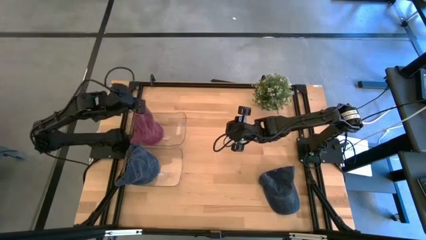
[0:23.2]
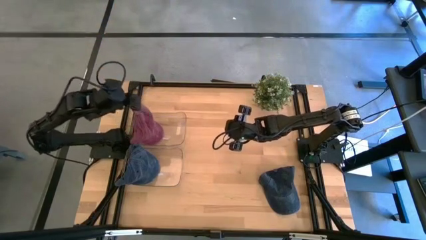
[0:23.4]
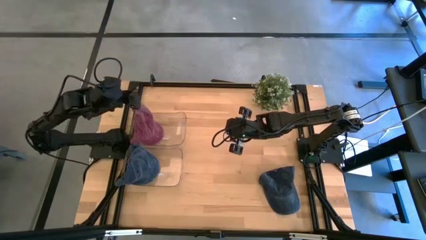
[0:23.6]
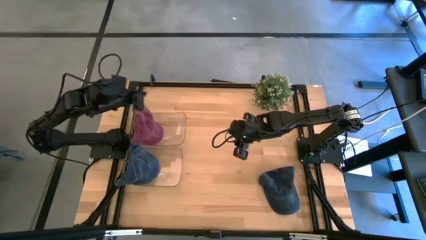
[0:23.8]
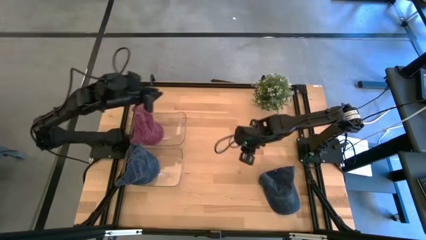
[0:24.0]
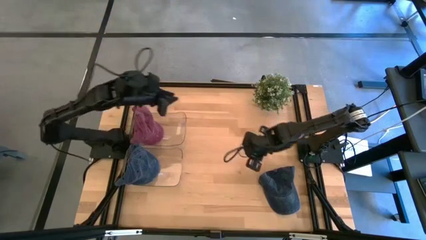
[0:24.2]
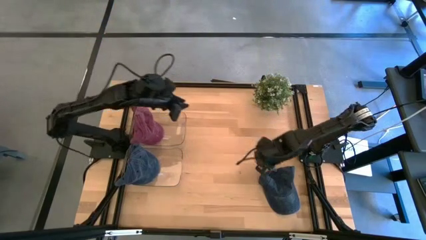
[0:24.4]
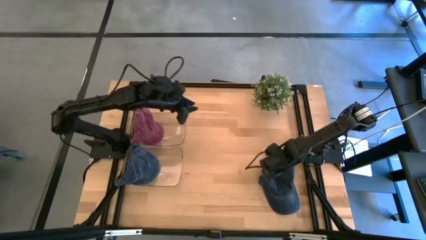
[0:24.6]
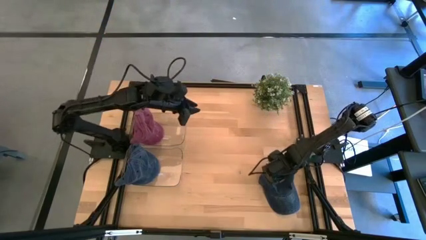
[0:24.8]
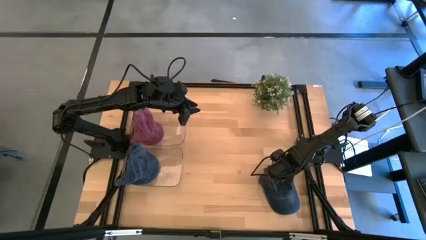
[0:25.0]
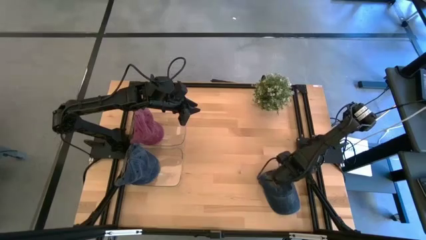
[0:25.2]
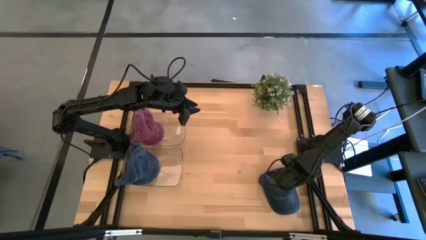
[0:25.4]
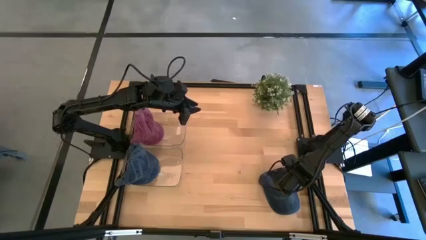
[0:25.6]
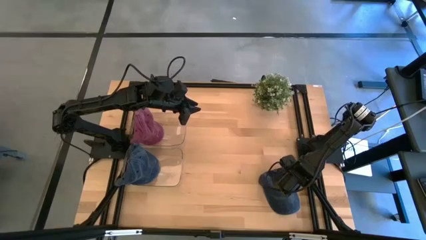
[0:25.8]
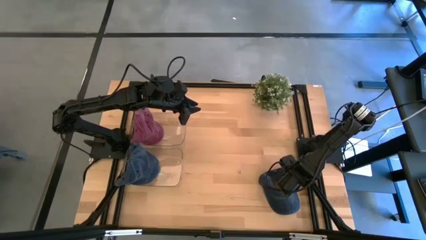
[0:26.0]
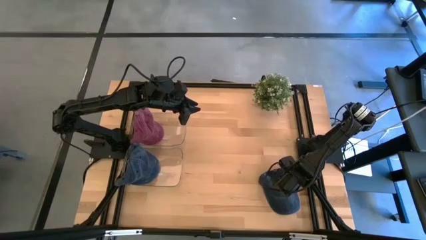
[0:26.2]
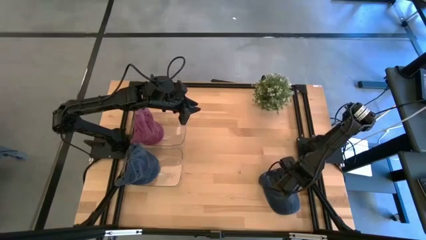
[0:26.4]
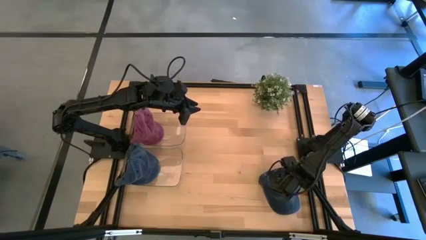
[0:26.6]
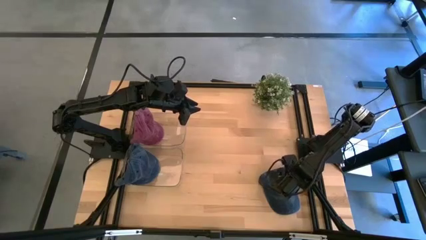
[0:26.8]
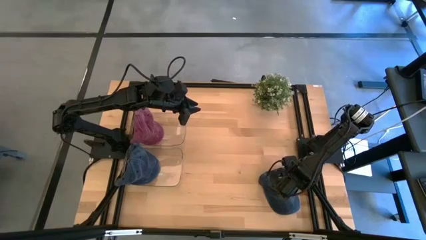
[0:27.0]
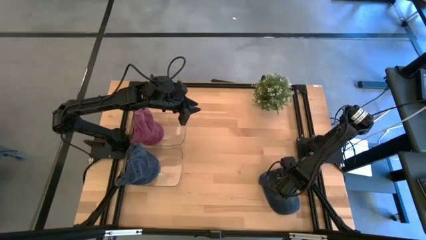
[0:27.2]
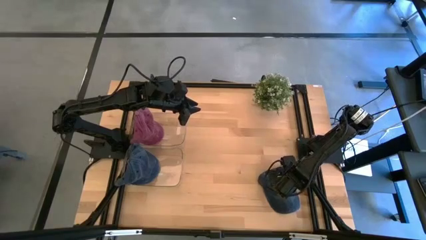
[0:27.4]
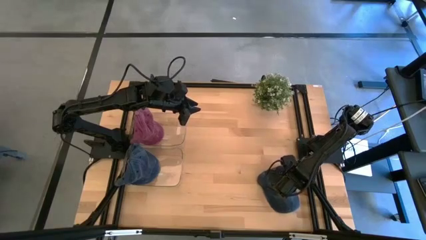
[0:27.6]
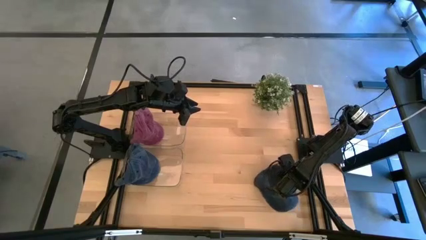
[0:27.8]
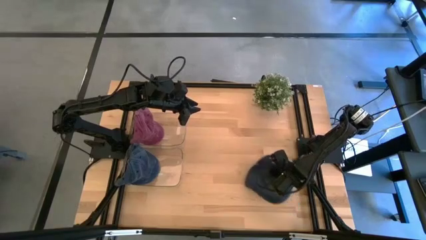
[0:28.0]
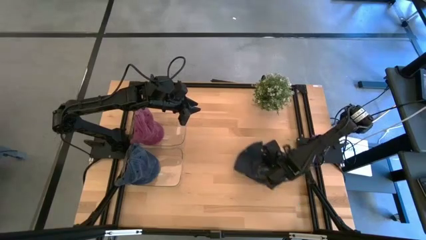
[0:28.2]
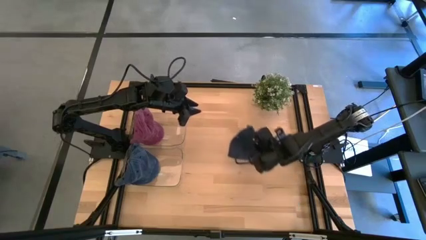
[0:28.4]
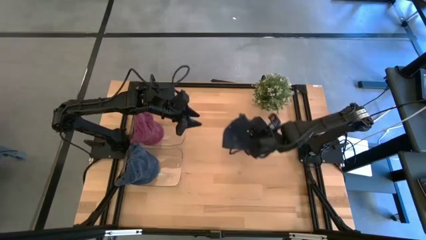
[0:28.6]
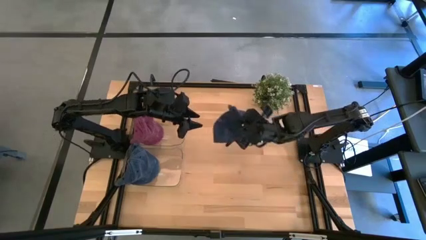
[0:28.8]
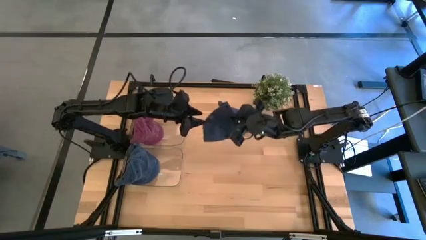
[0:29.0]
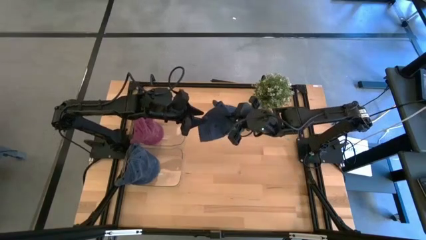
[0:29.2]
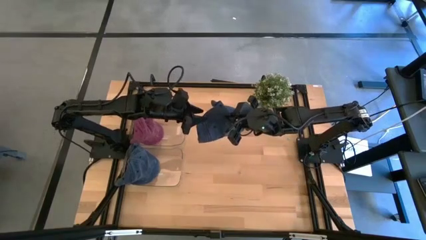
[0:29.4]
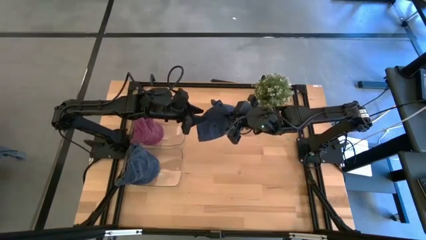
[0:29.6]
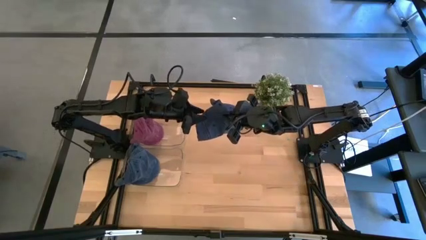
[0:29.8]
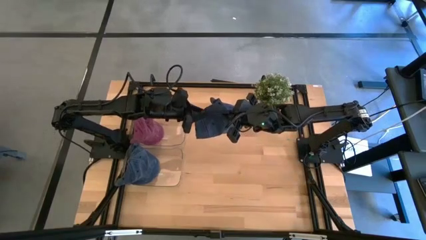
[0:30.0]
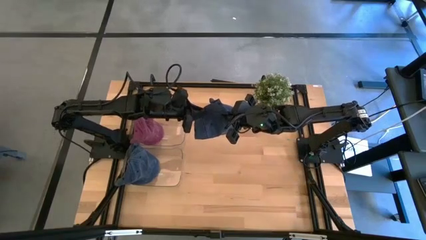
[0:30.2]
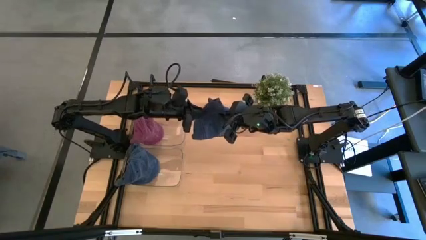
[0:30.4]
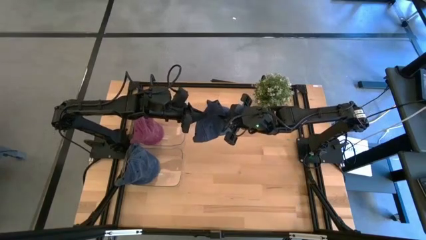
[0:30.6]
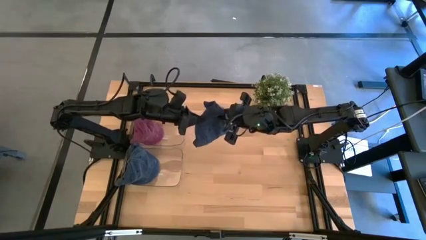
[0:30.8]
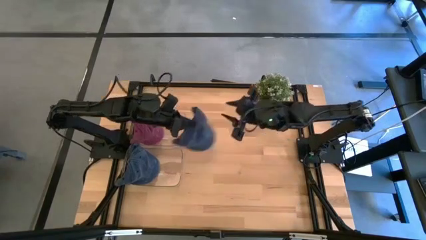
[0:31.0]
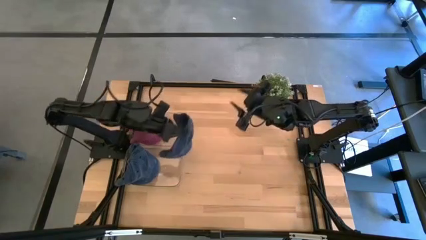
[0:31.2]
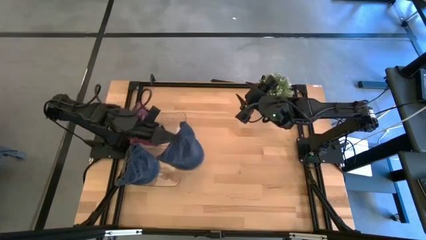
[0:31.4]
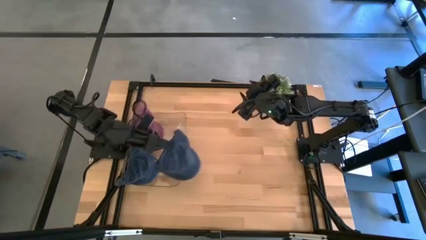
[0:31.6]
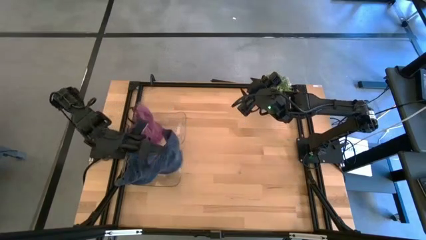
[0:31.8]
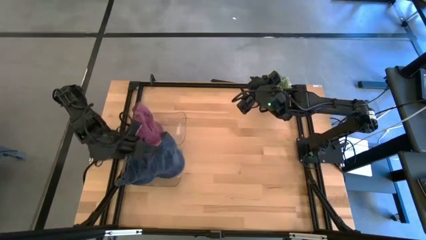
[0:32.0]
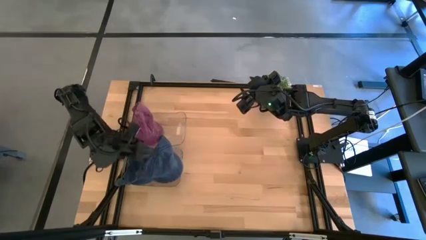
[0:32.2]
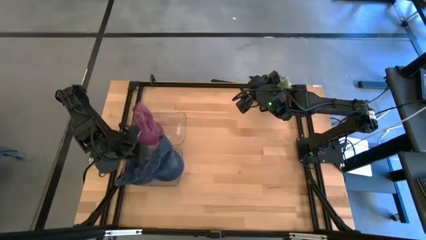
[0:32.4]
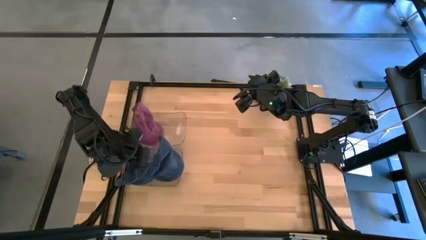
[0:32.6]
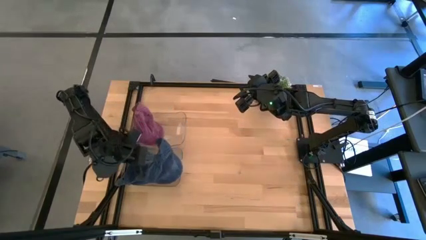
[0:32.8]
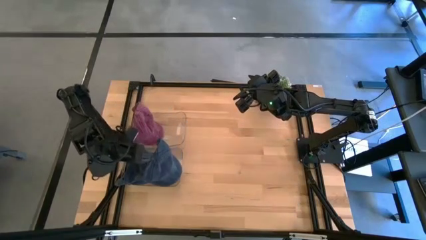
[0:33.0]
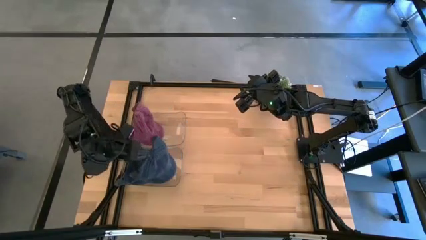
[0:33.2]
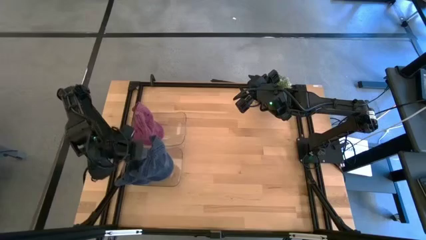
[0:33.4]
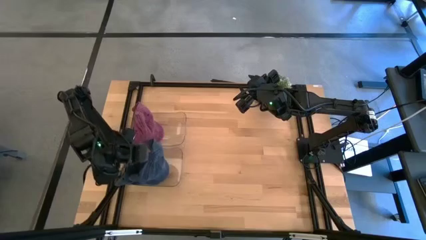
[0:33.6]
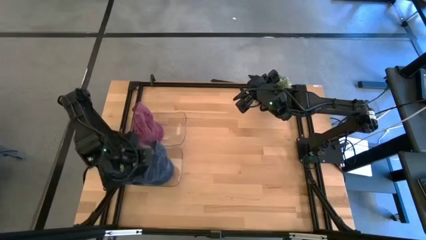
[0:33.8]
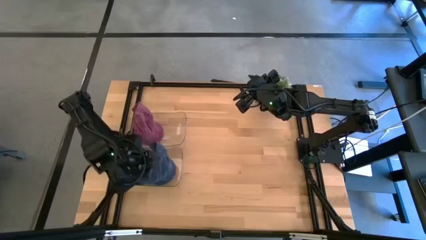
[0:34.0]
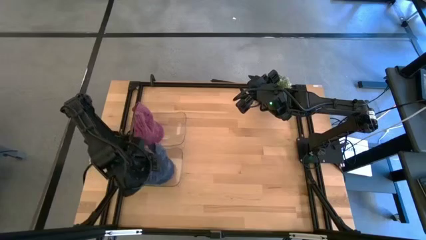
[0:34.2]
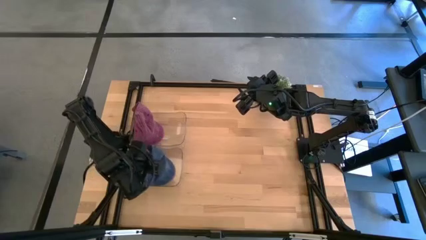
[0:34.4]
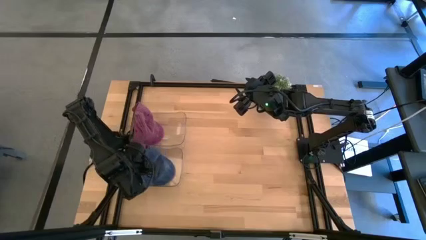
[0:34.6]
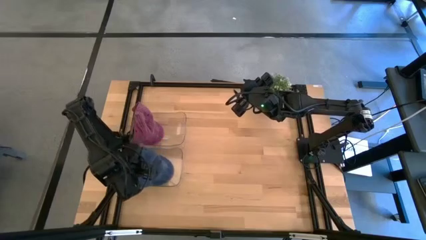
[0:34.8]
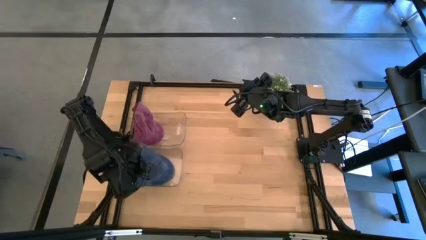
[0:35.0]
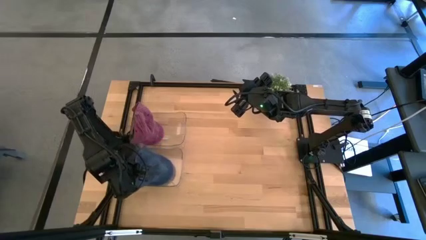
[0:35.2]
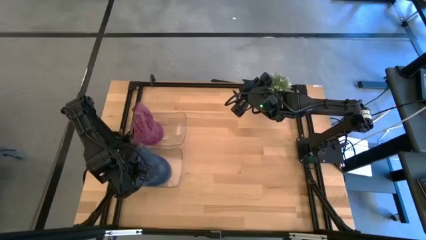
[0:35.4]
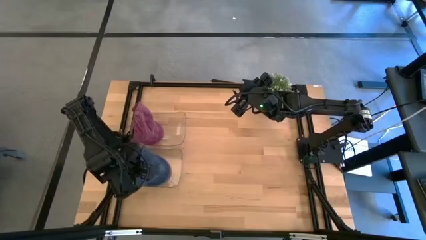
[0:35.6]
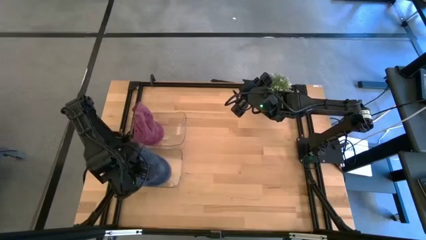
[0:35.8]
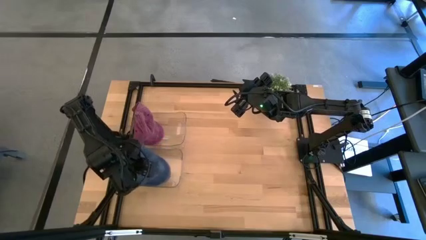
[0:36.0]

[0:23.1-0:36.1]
Task: Pick & Place hat
Put the blue cap into the bottom transparent bin

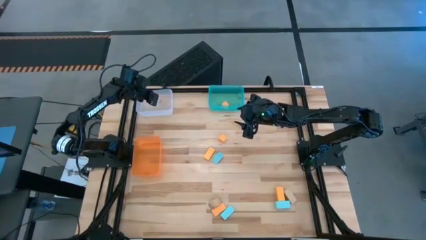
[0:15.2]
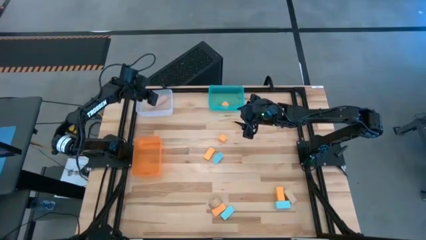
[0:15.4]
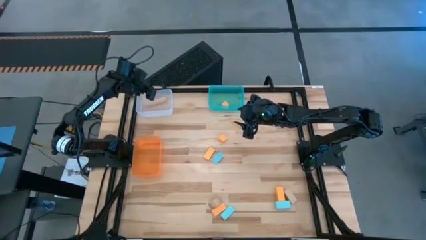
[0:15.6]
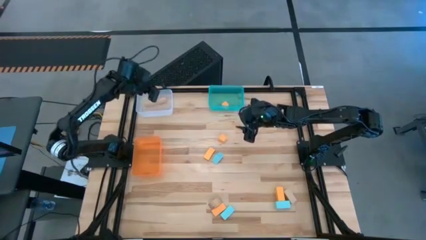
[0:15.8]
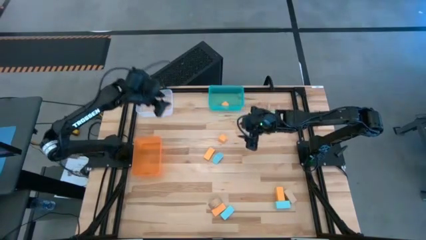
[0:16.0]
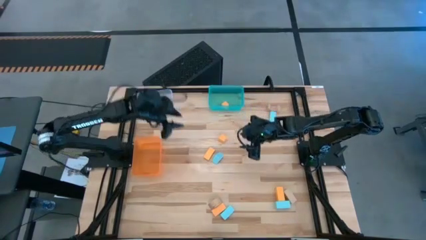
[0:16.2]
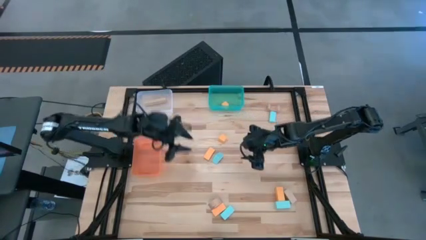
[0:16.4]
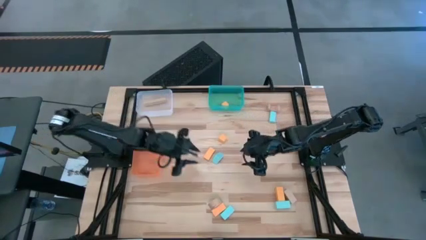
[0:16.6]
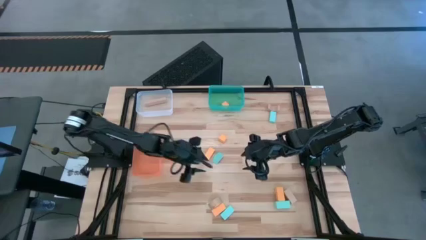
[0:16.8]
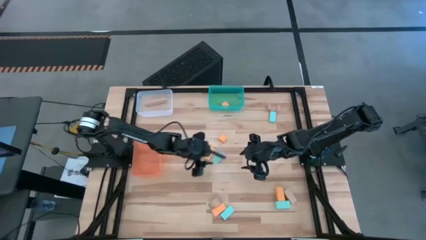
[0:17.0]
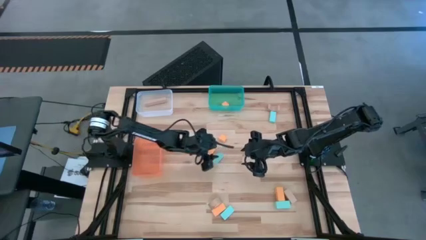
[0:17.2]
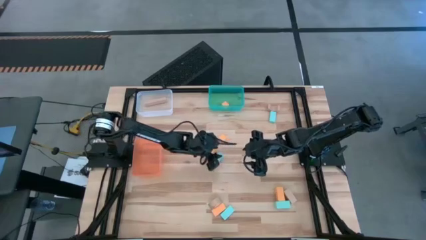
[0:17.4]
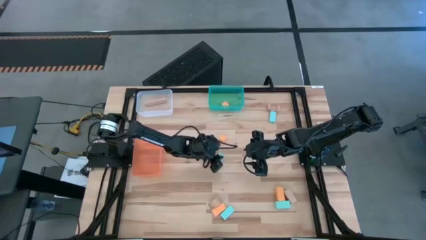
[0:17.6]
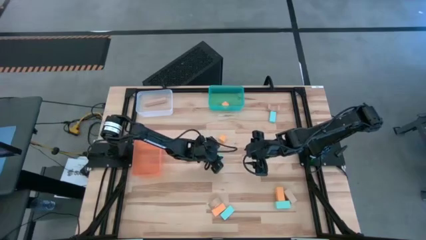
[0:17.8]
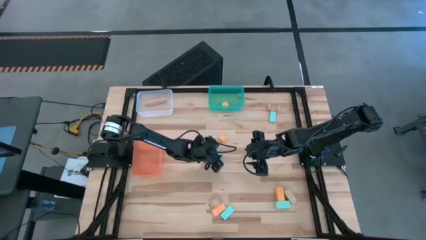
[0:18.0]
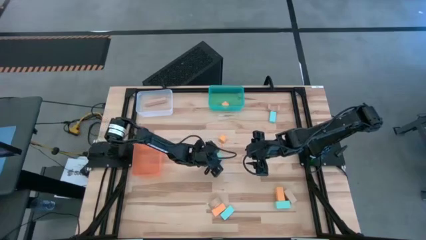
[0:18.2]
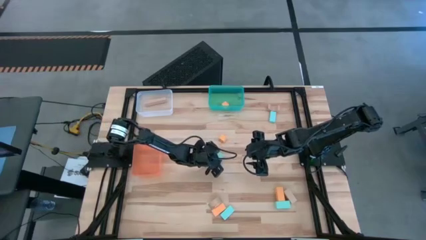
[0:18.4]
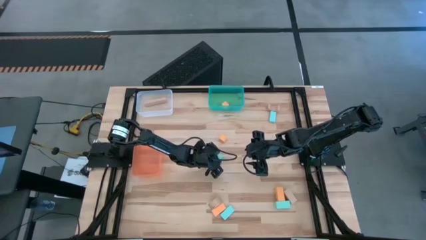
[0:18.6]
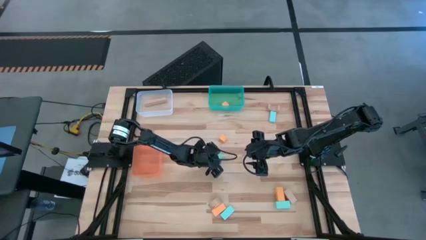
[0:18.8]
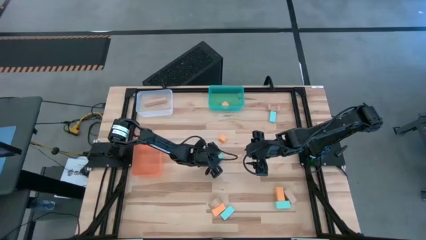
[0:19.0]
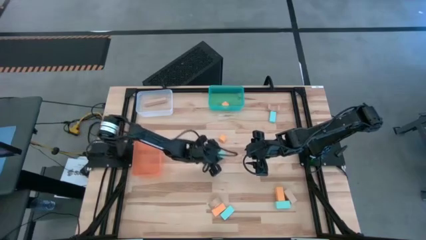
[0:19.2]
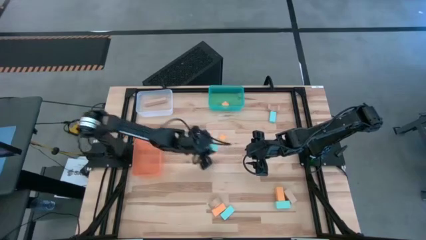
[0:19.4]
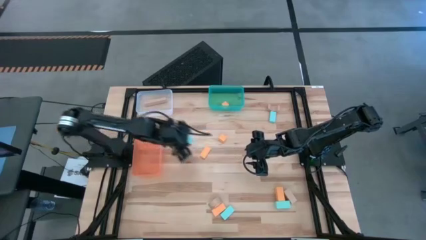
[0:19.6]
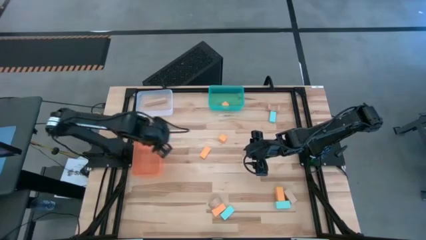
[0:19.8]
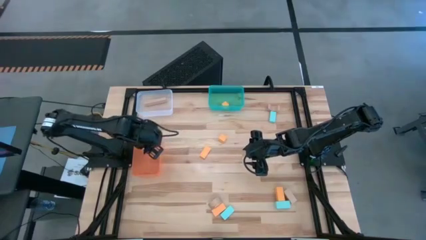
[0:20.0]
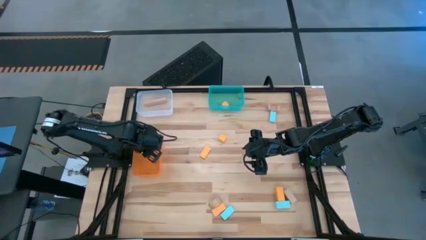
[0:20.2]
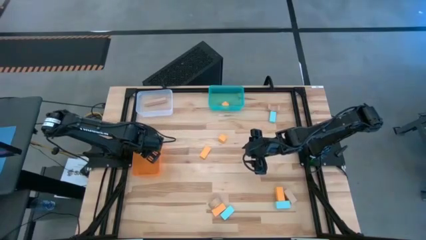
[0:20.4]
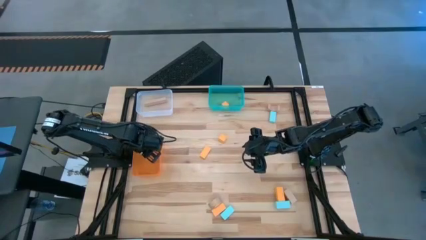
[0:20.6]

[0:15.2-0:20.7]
Task: Sort & place blocks by color
Put the blue block into the orange bin
